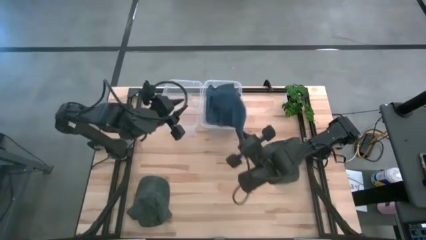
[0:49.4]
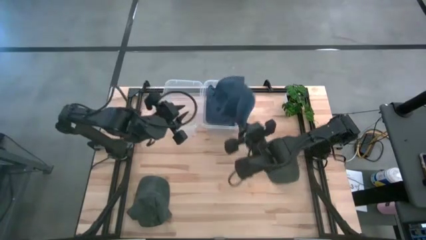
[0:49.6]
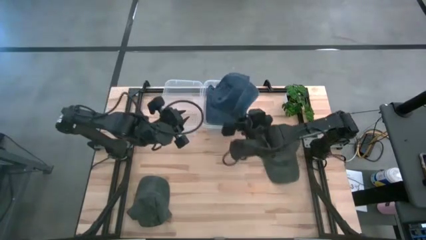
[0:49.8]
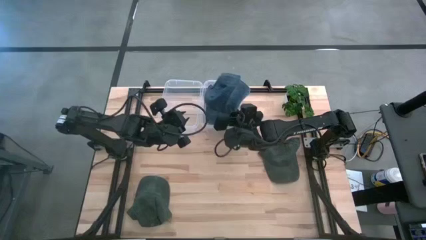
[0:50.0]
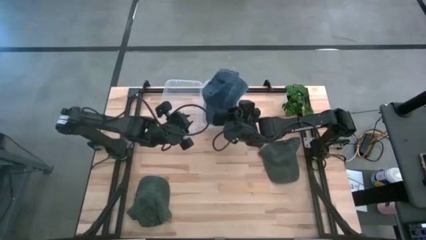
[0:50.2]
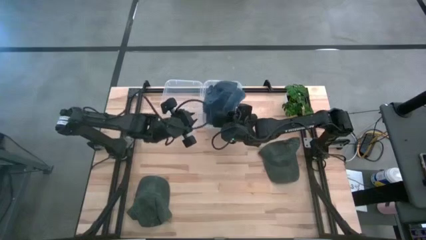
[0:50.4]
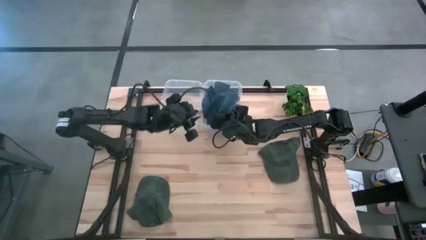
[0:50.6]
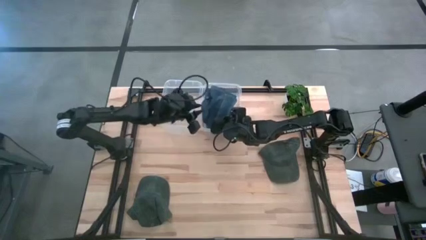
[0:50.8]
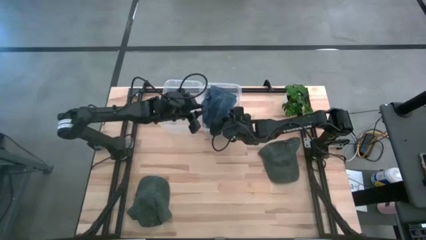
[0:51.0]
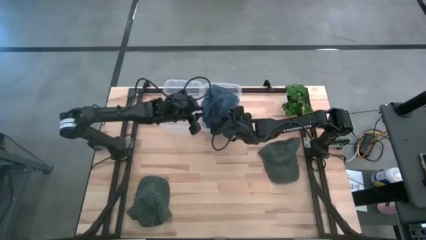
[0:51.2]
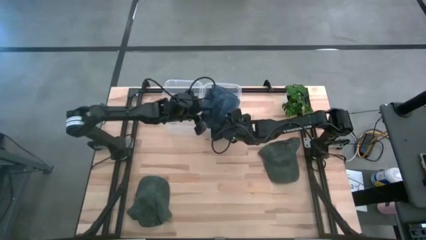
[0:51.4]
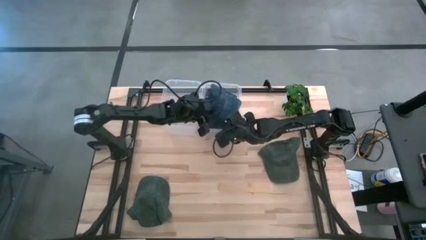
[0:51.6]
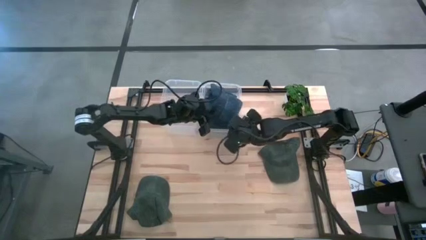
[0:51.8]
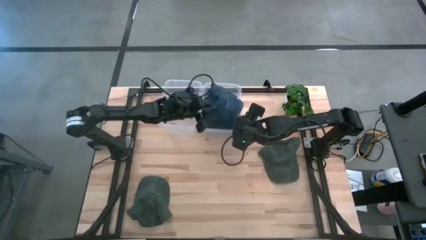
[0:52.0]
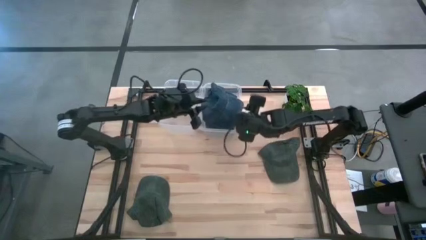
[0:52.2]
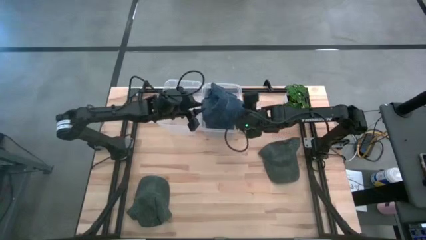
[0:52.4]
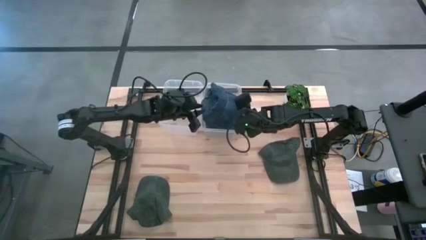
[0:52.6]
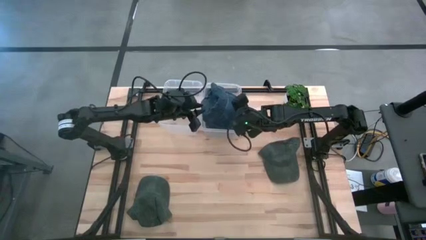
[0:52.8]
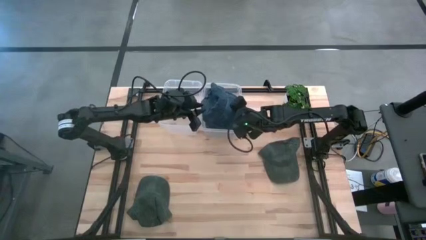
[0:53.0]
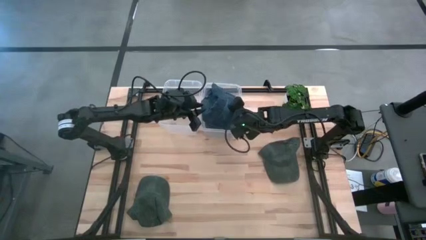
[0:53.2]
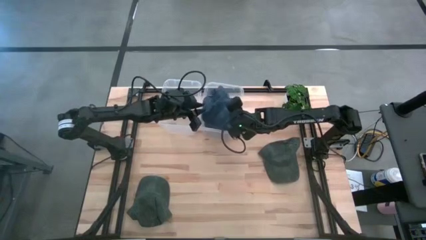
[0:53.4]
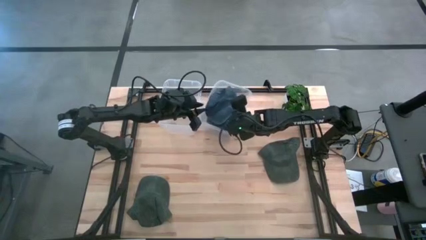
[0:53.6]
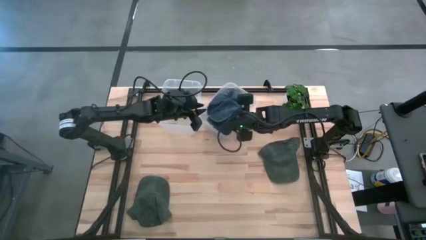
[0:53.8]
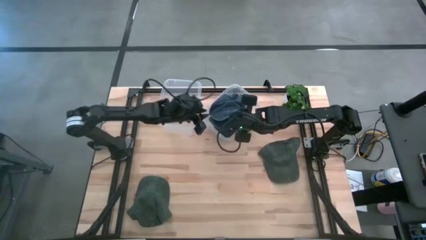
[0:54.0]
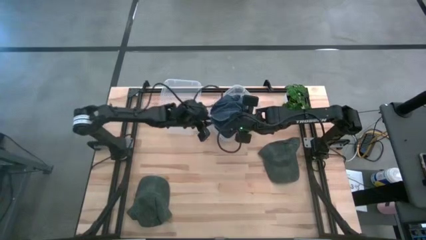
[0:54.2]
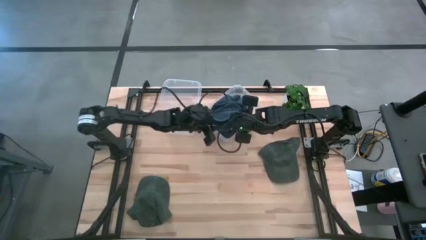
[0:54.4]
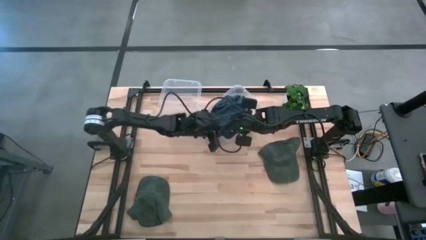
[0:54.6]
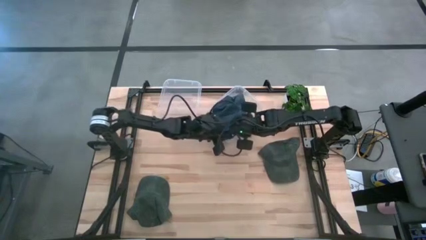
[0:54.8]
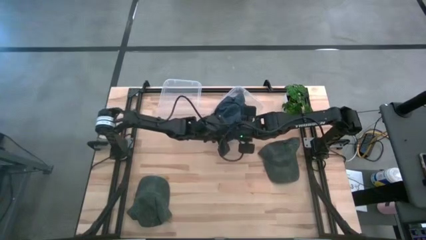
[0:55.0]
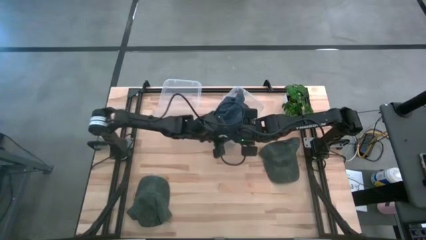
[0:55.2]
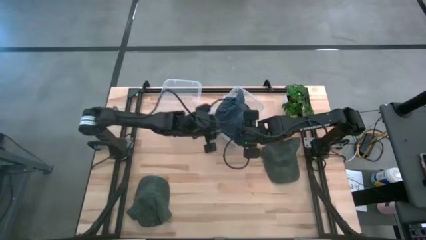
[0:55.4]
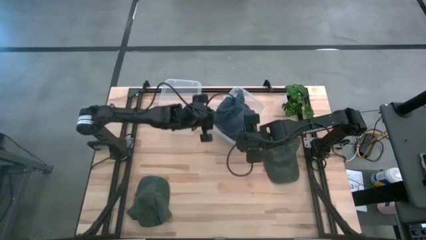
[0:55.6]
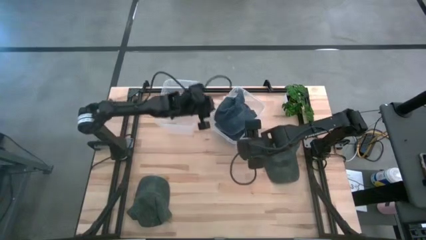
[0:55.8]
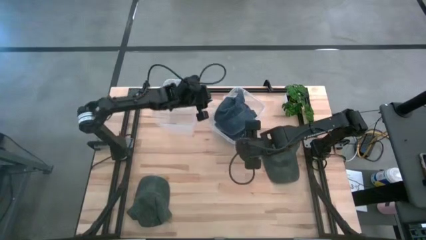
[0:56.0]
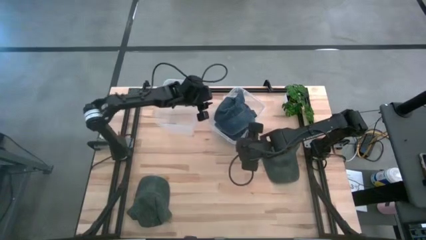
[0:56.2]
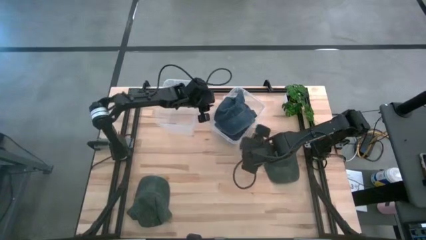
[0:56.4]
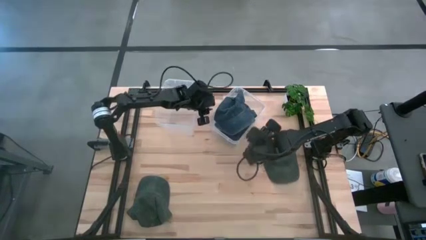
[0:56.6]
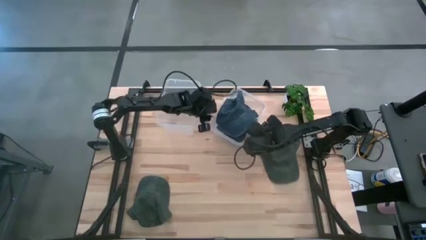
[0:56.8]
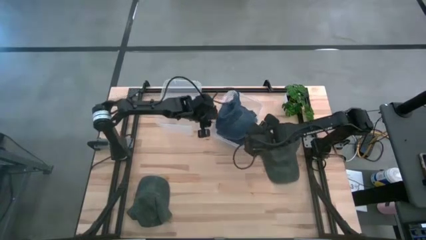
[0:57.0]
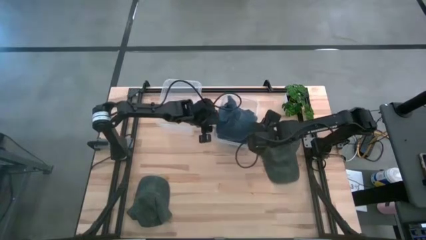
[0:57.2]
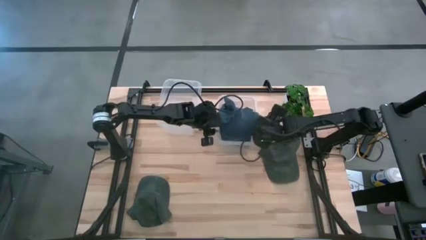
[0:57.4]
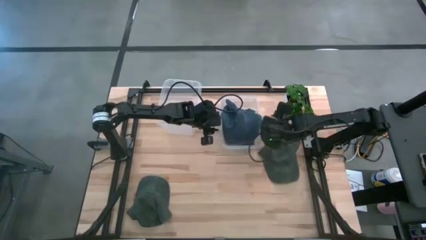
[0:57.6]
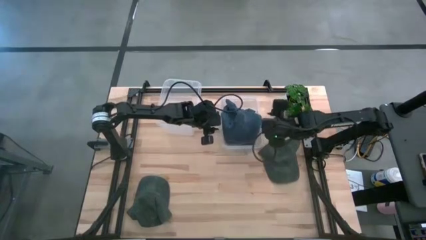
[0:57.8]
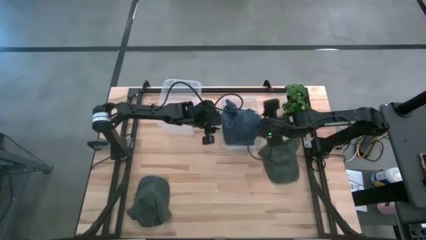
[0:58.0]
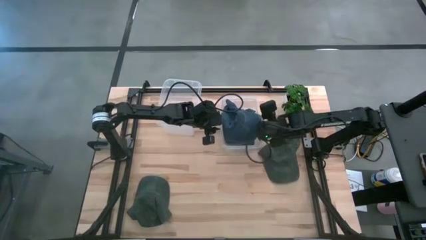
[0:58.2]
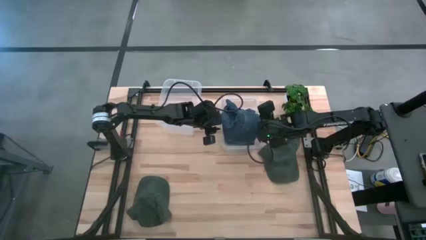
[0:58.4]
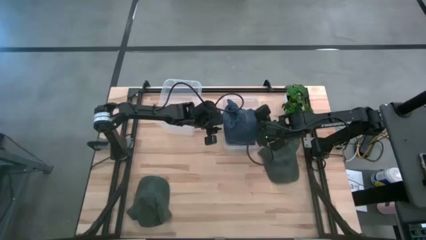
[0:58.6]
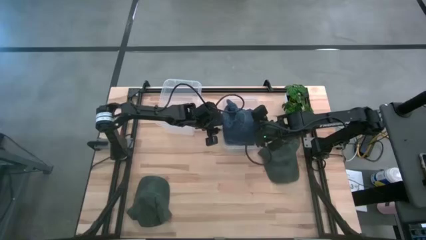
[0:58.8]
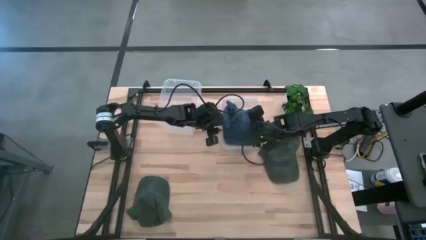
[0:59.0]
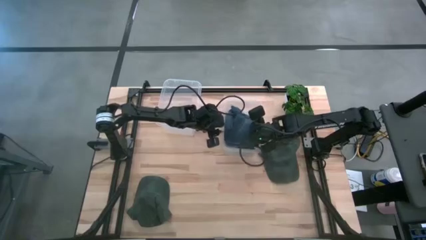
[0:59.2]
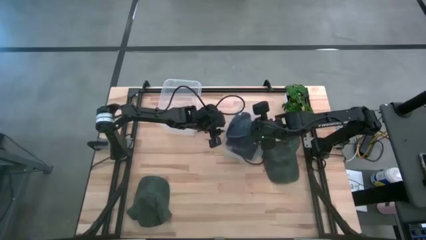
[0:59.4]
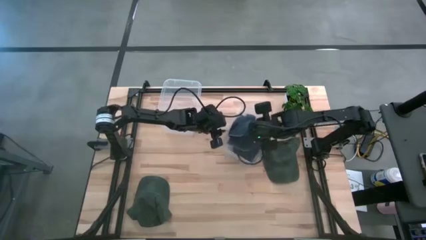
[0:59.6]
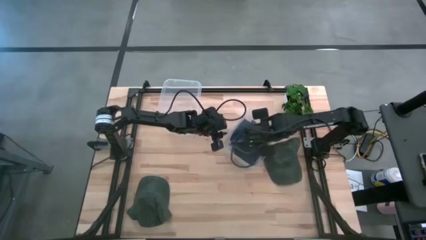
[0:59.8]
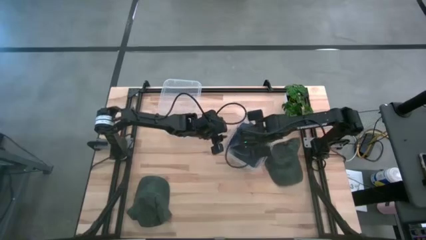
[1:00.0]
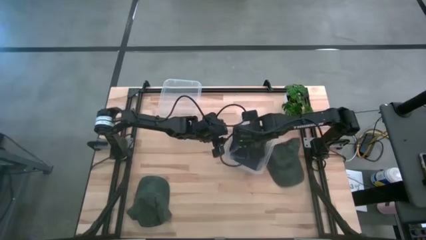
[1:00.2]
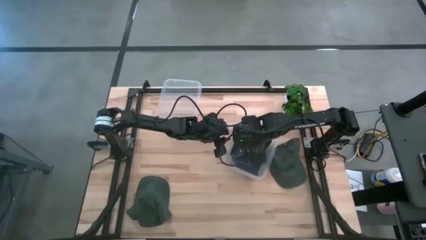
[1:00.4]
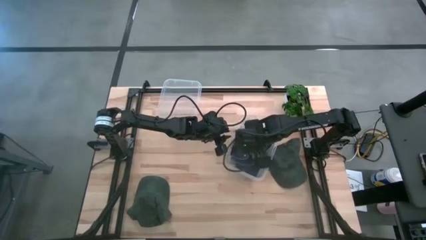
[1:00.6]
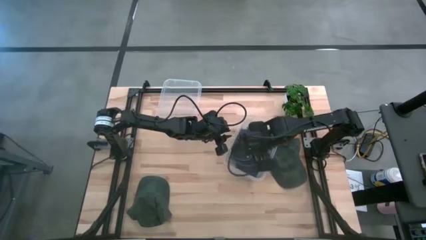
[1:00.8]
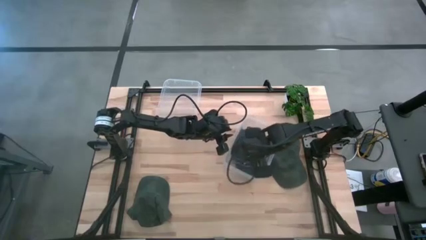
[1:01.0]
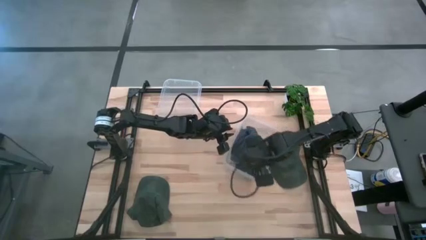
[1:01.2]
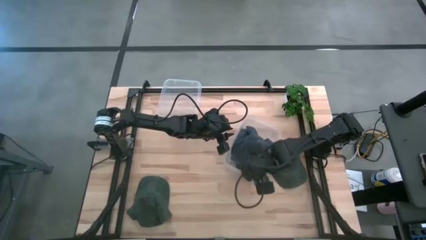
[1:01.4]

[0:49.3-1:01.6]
Task: Pick & Place hat
Put the blue cap into the right transparent bin

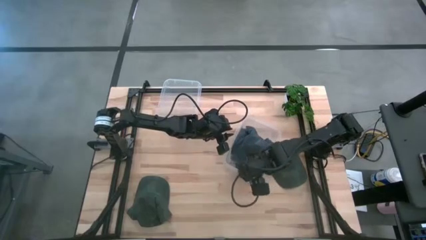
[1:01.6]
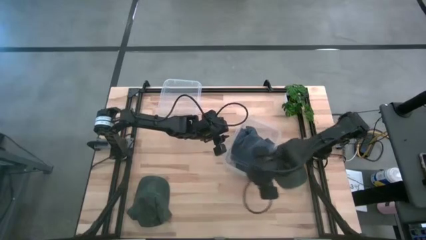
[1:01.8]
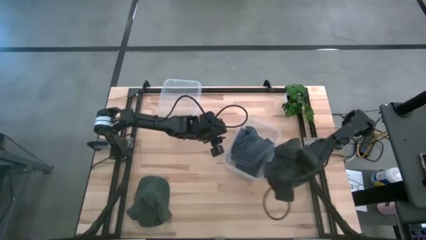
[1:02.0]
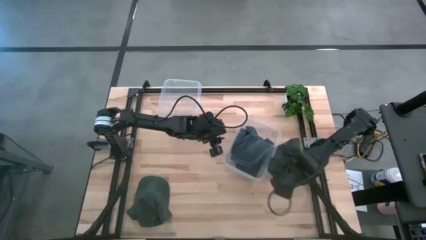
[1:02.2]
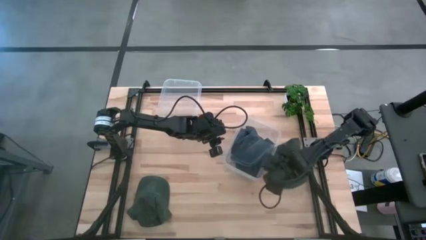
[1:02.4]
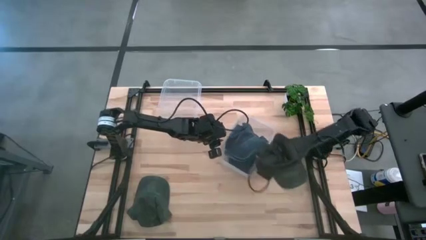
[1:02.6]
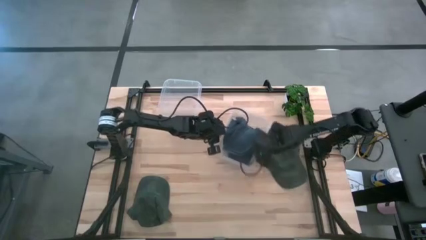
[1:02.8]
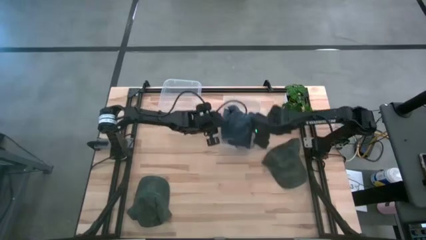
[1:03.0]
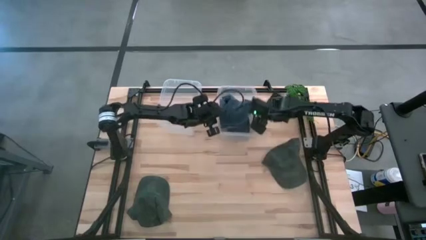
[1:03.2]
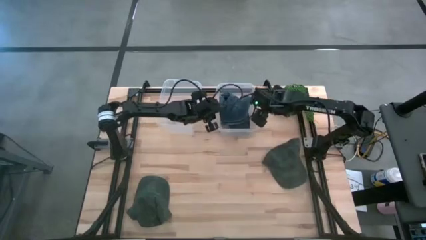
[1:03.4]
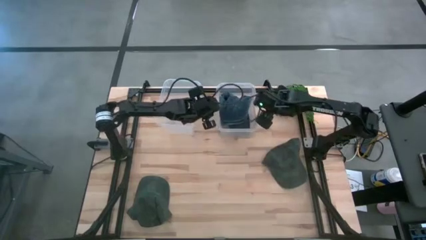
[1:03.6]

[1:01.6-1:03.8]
Adjust the right transparent bin
